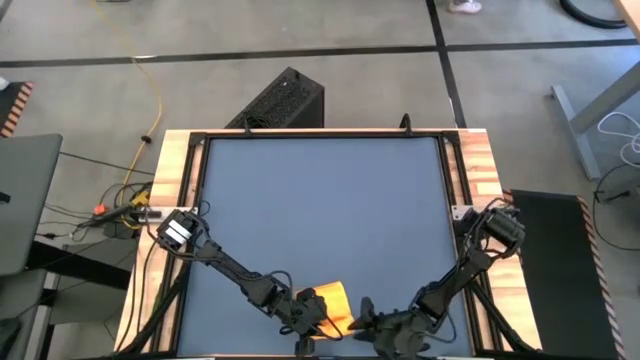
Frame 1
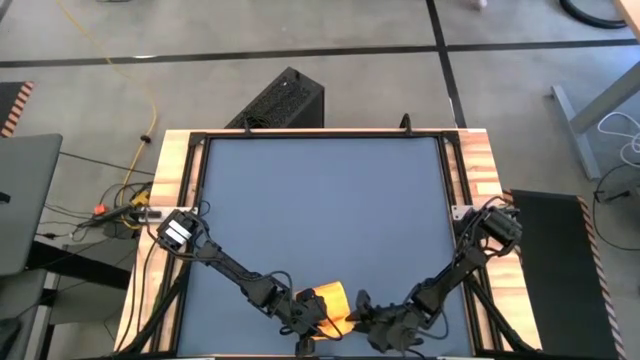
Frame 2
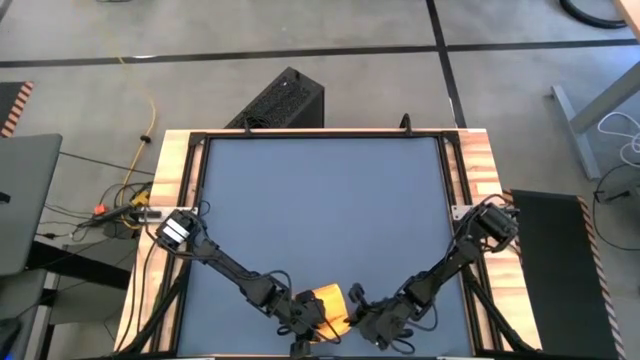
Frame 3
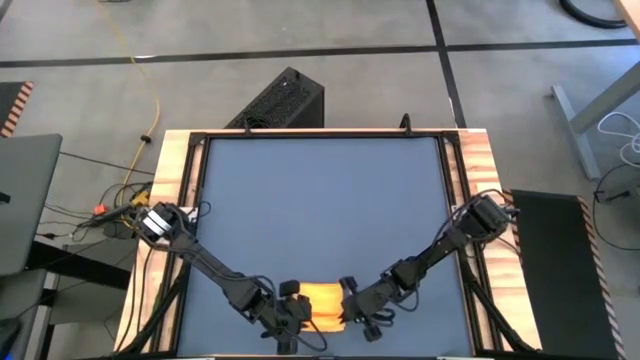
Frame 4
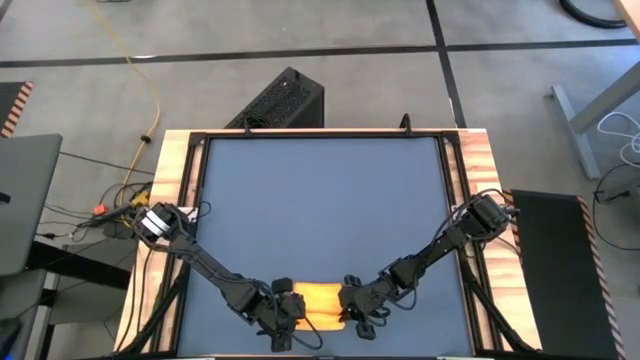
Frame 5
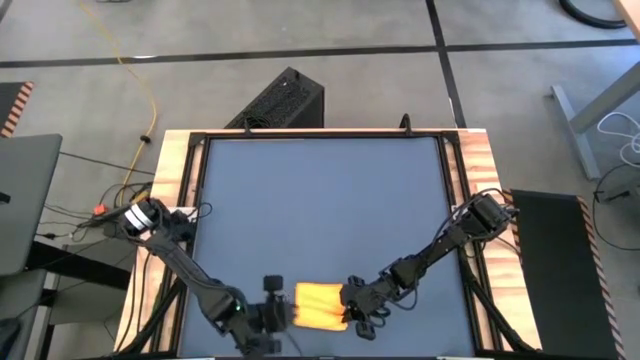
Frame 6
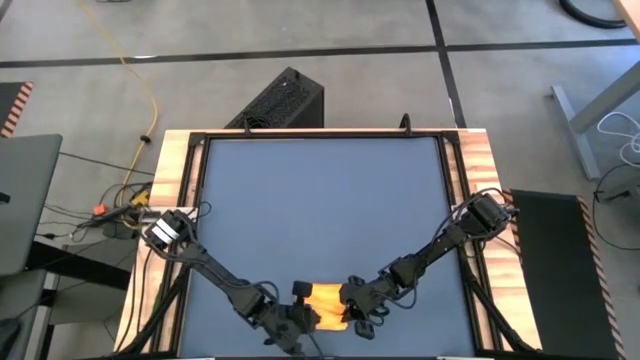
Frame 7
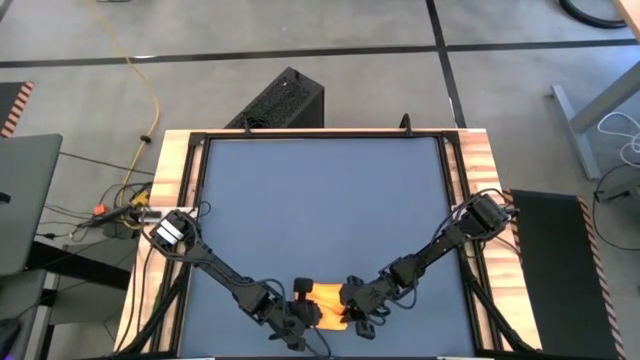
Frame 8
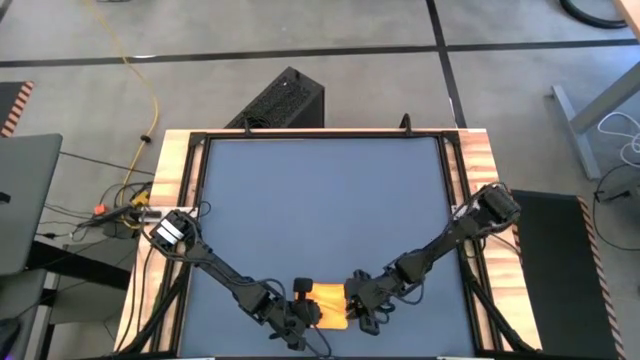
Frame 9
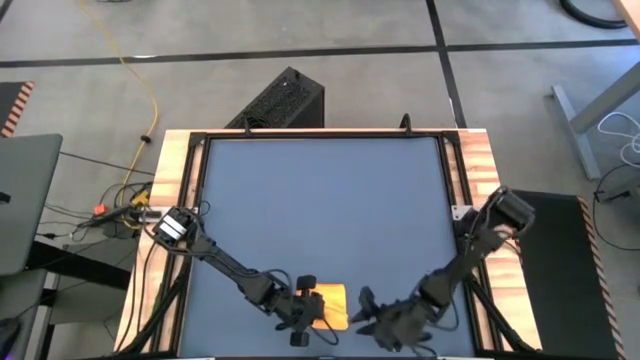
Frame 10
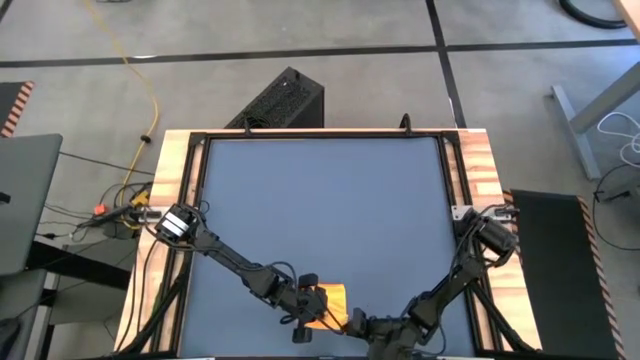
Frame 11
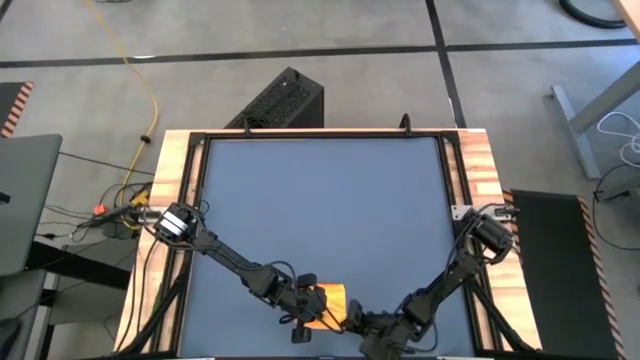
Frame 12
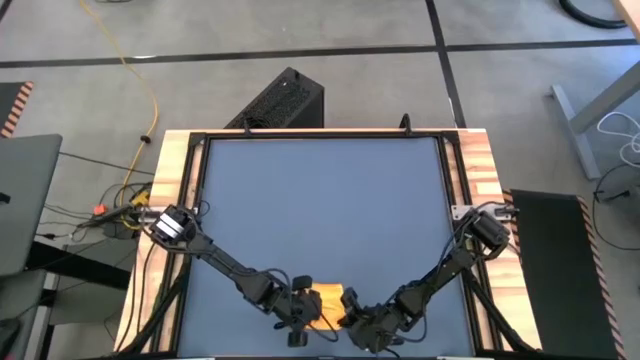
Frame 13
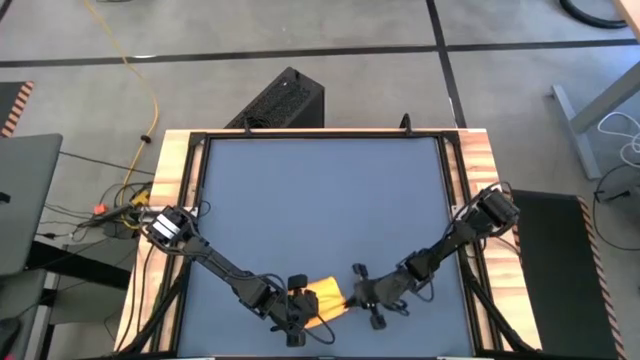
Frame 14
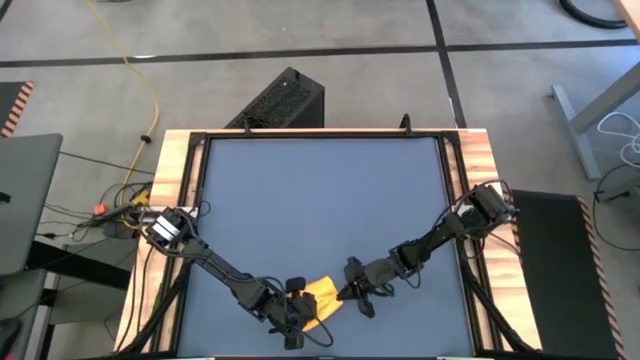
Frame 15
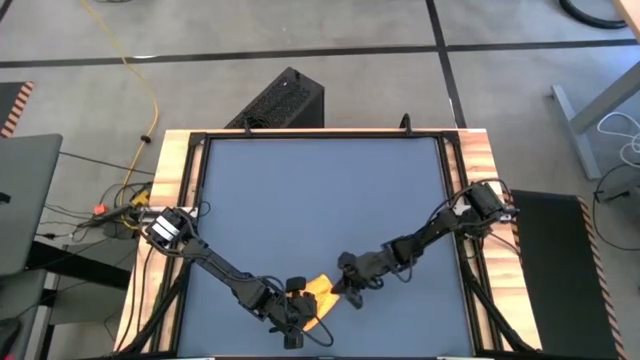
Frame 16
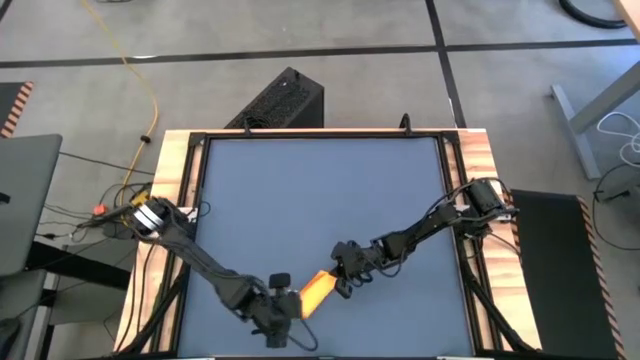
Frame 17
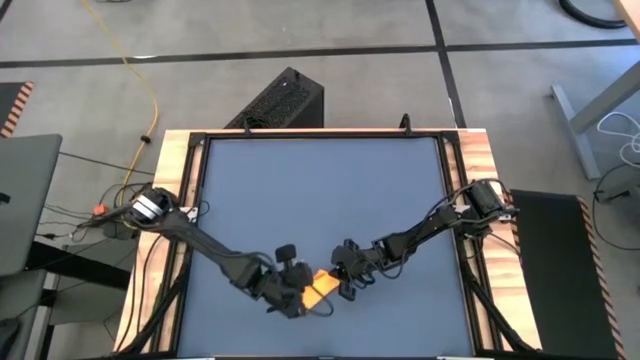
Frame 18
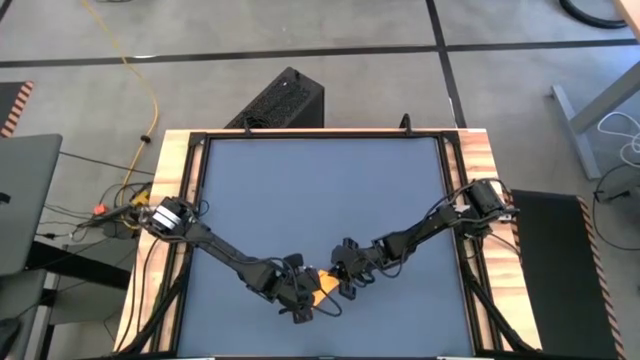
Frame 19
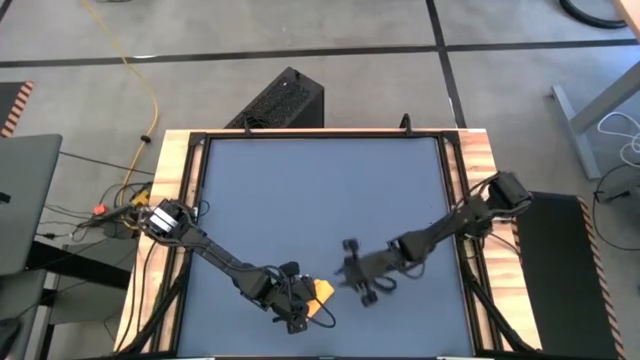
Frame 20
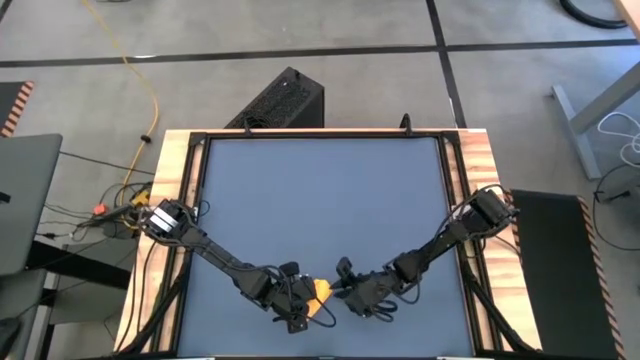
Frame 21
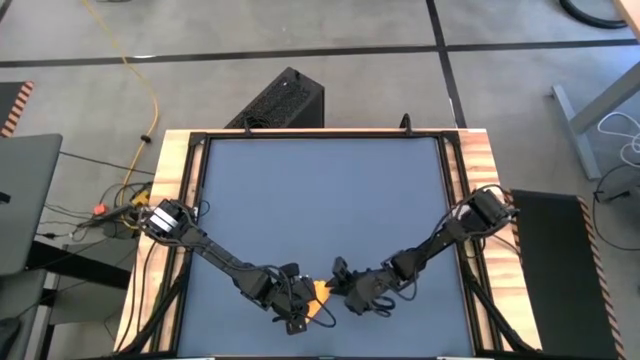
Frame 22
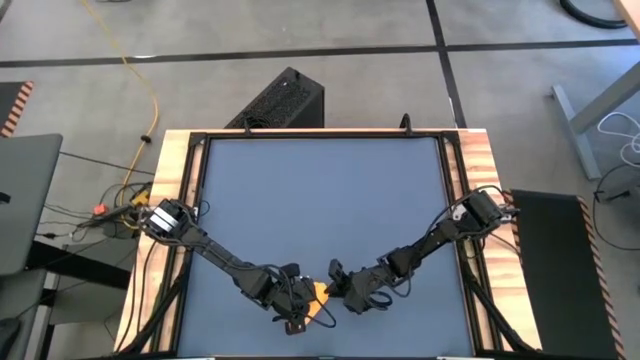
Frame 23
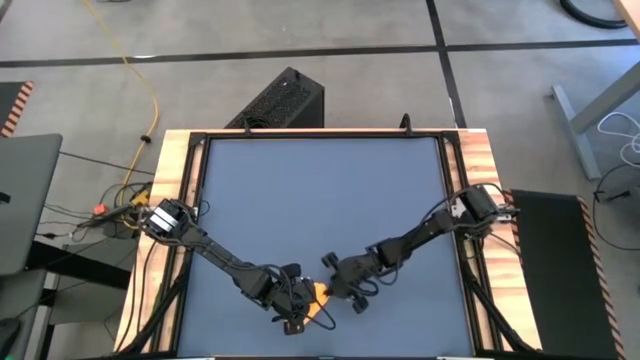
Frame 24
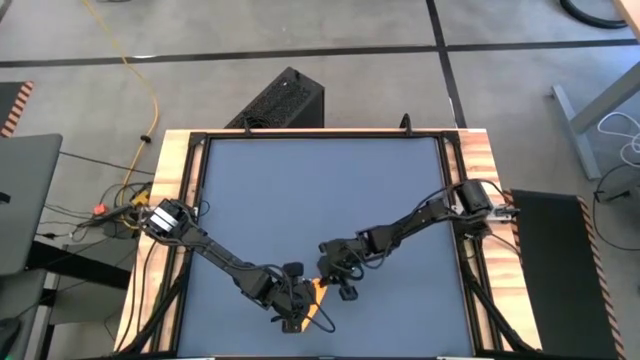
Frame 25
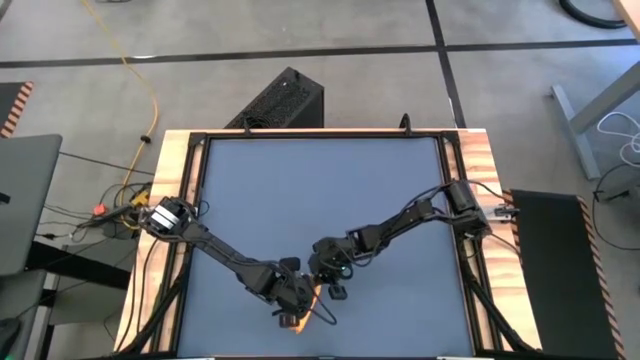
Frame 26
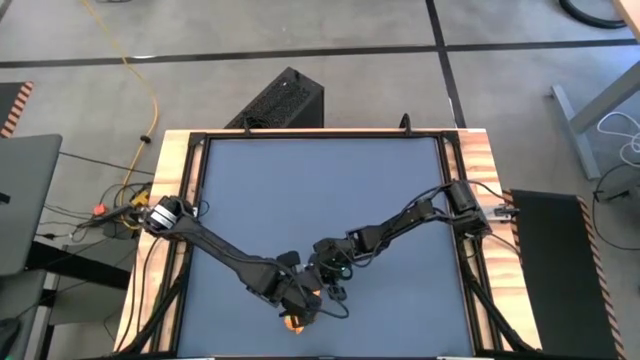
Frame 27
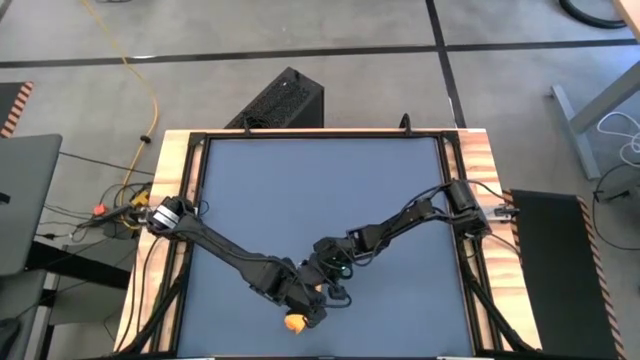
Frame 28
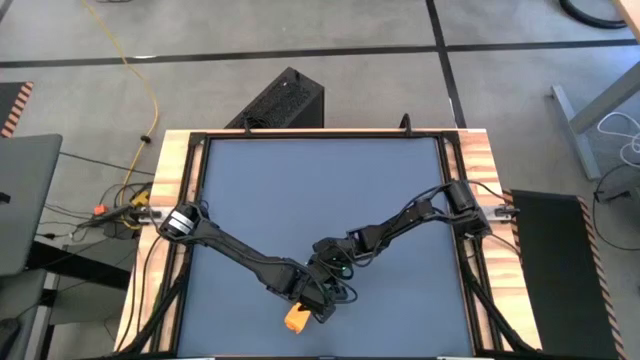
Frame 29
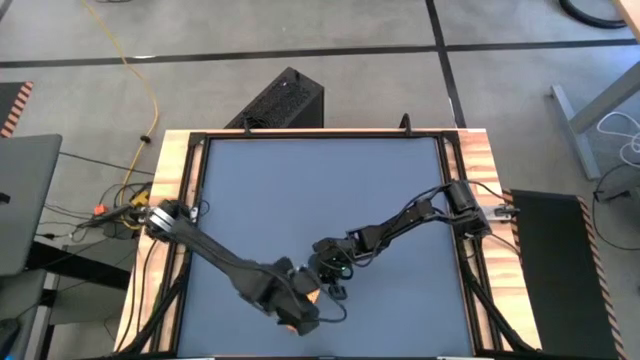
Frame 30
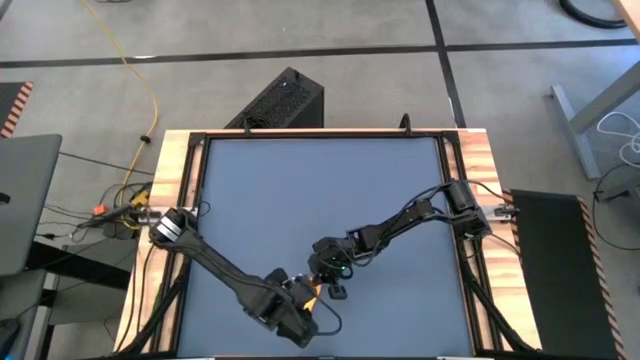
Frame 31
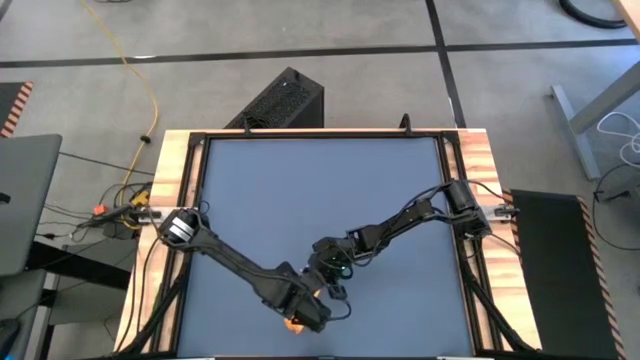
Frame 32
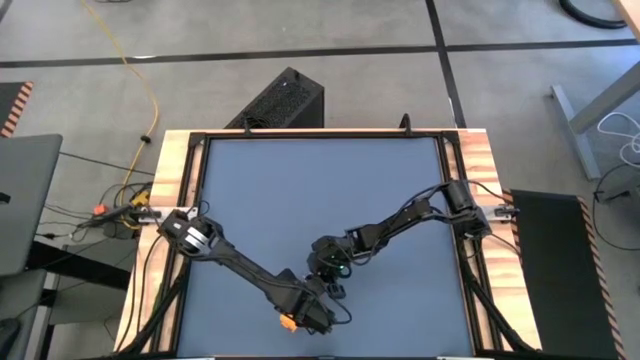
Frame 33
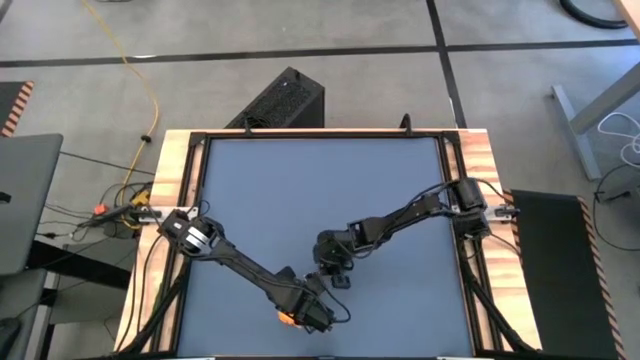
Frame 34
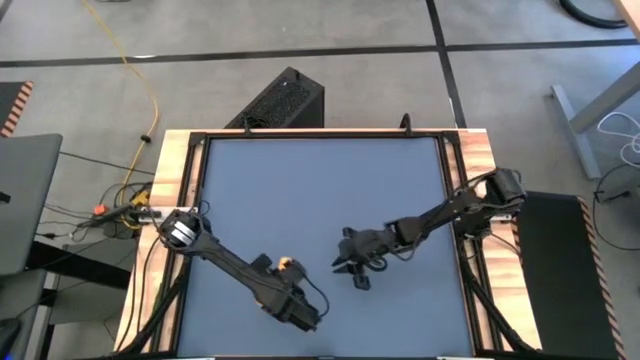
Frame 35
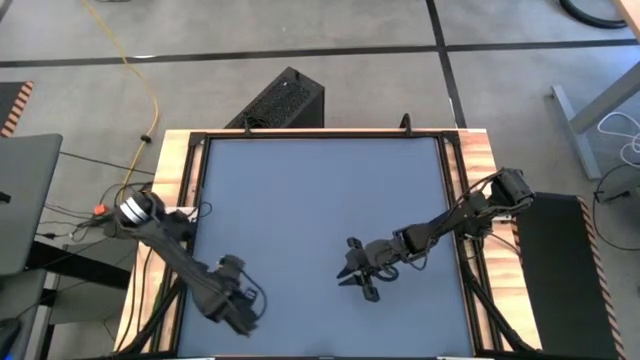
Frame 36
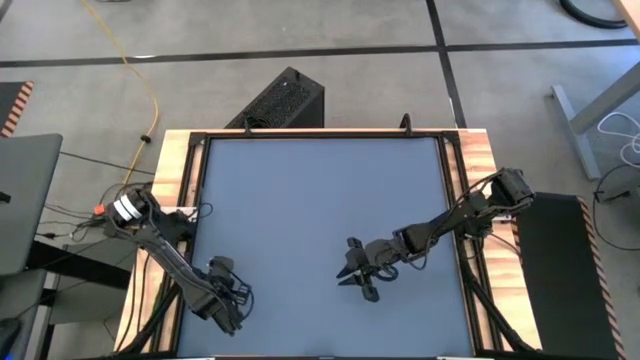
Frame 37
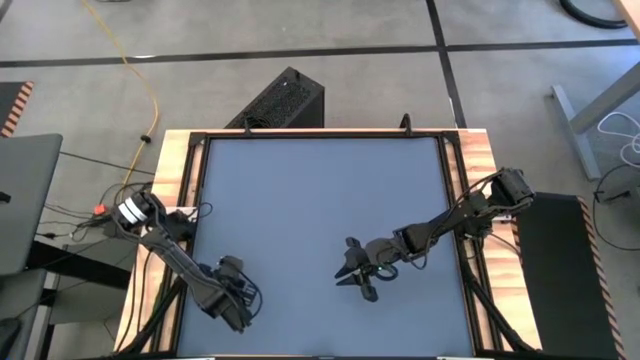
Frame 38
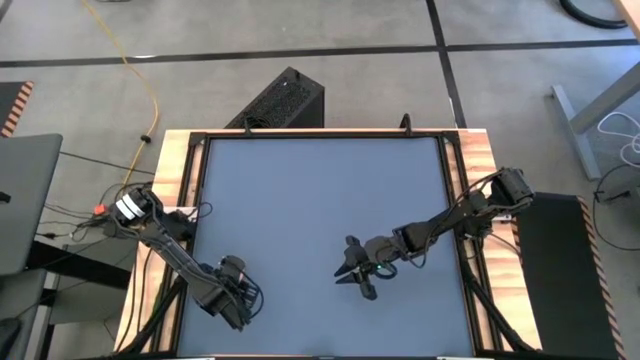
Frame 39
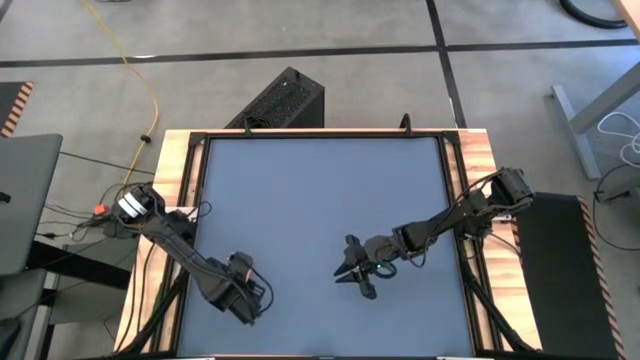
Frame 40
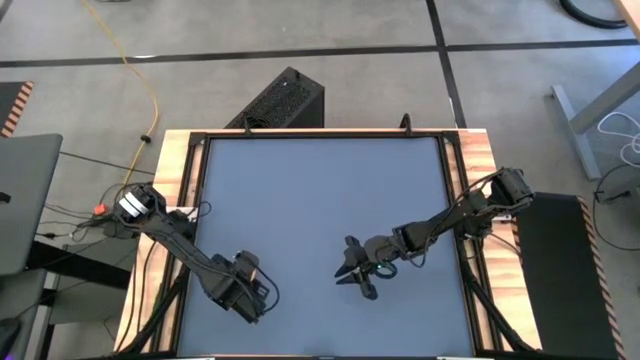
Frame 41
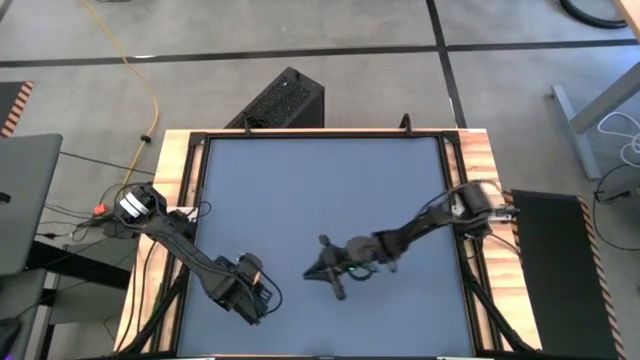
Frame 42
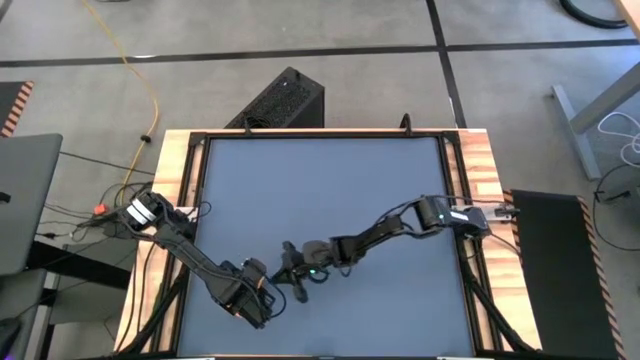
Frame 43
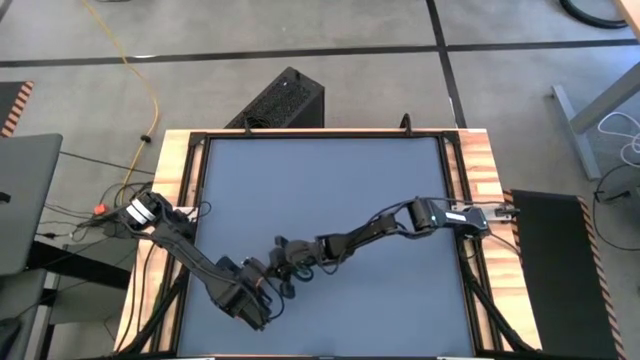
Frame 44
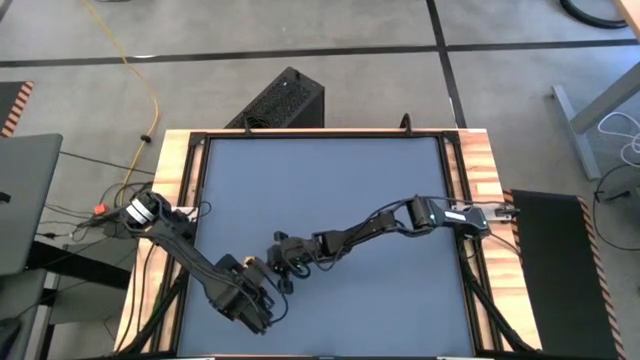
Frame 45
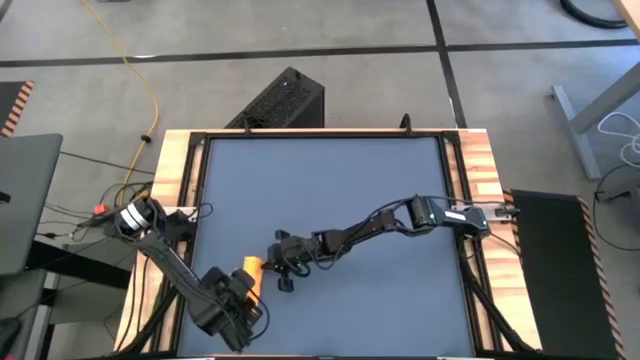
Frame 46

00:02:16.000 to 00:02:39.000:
Task: Roll towel into tight, uniform cylinder
Roll the orange microfiber towel
